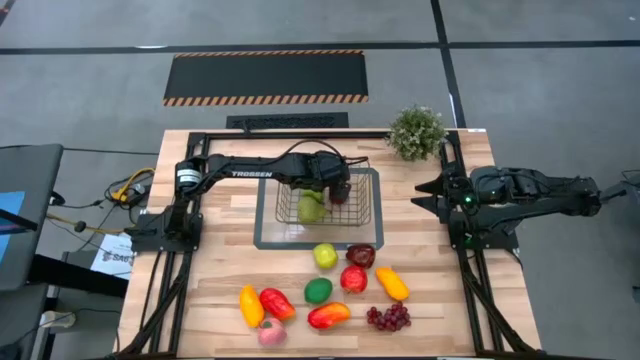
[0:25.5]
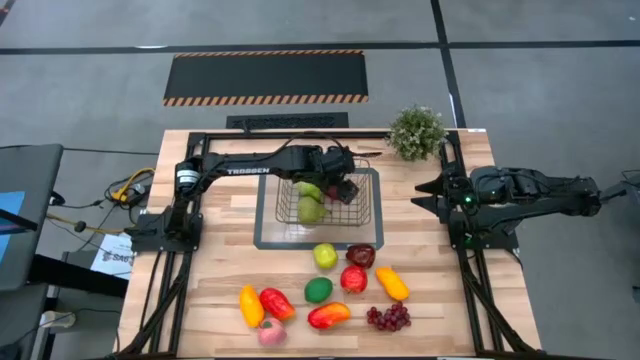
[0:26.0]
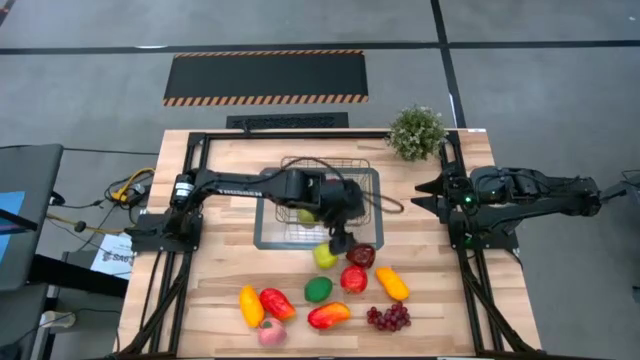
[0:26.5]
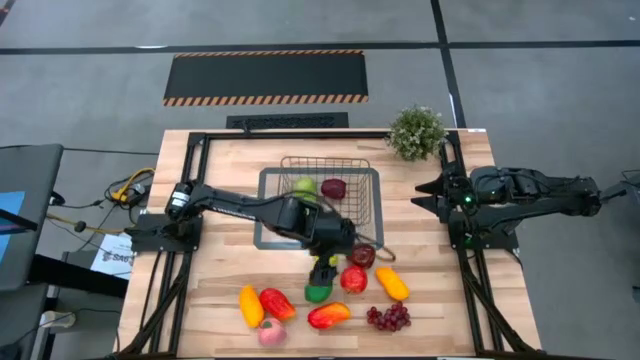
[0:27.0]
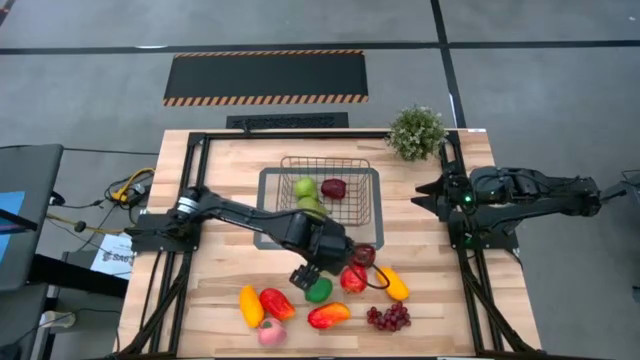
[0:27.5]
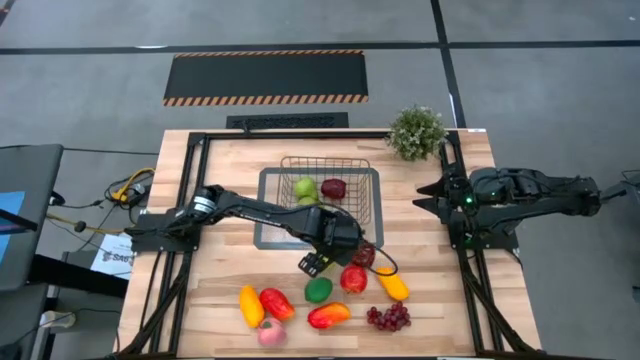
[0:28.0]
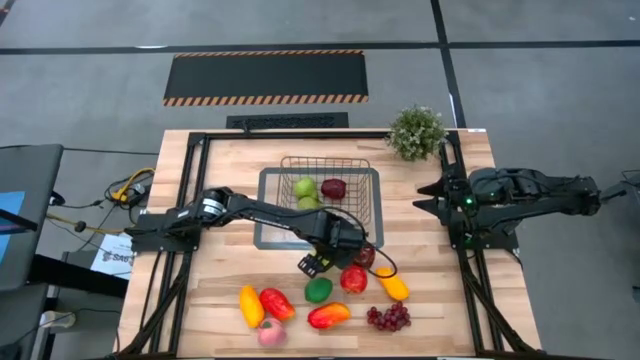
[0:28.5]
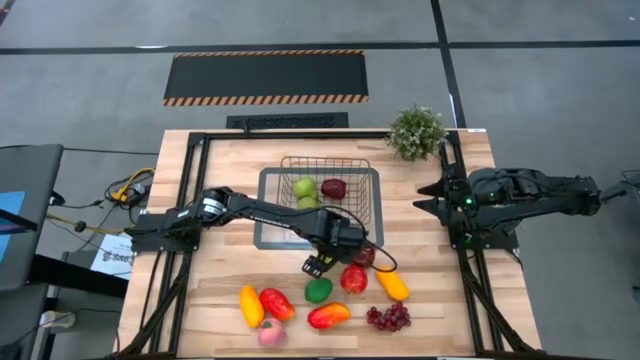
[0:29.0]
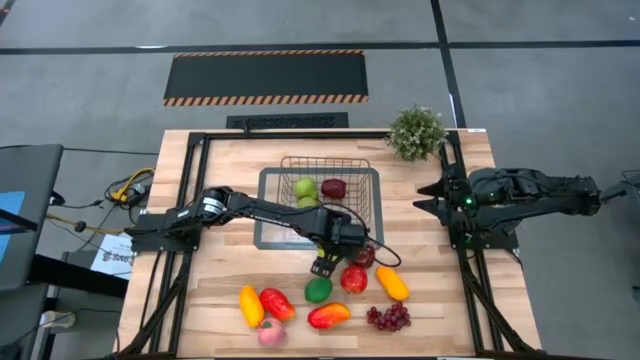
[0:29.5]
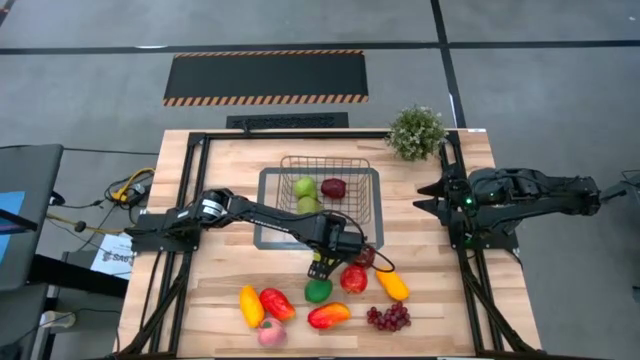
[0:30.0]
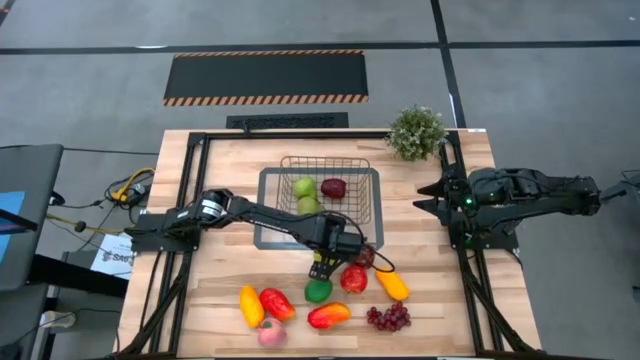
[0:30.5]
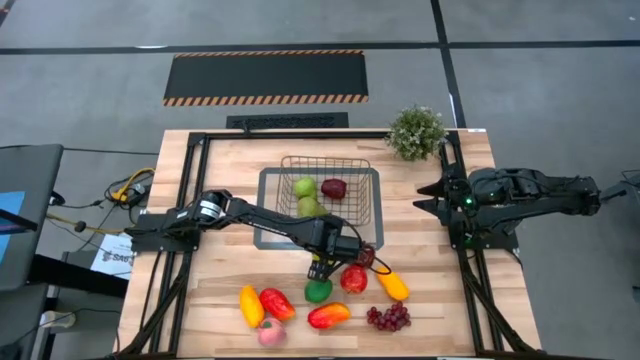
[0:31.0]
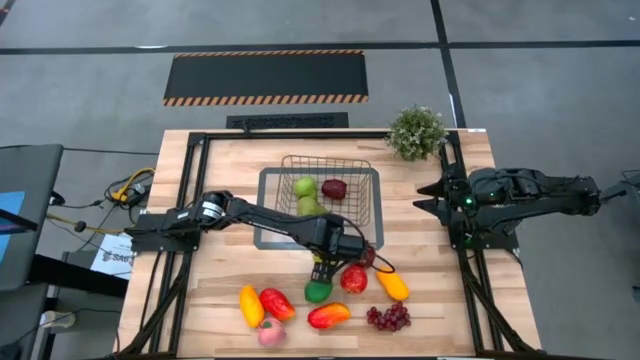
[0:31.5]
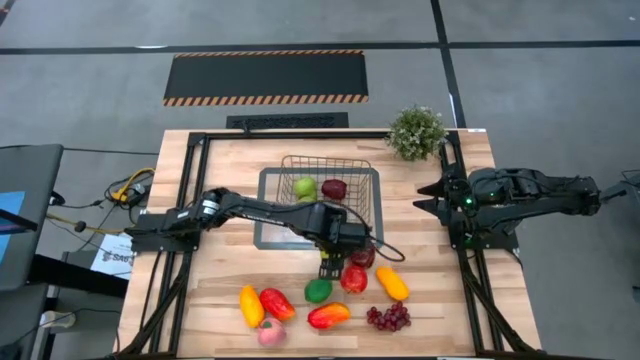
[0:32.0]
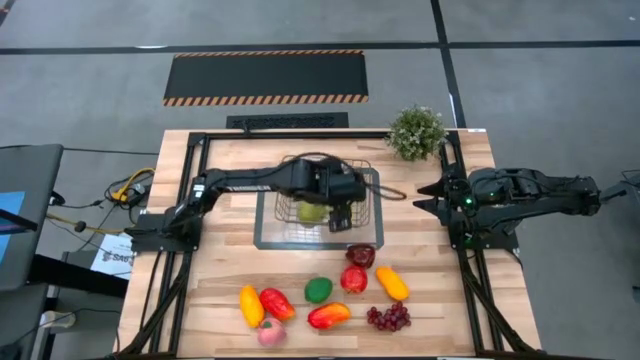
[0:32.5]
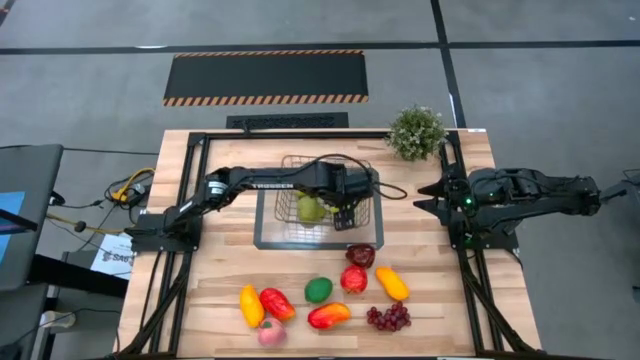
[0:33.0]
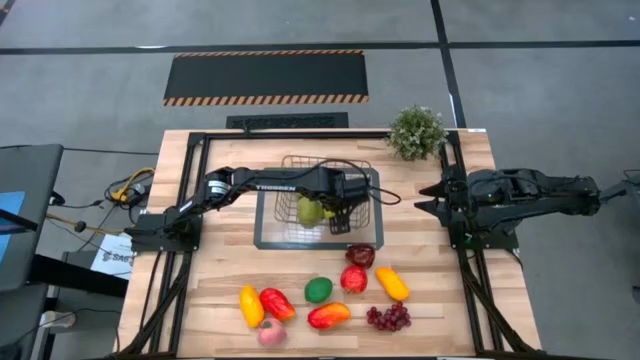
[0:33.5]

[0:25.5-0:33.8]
Task: Build produce basket
Put the green apple into the bin

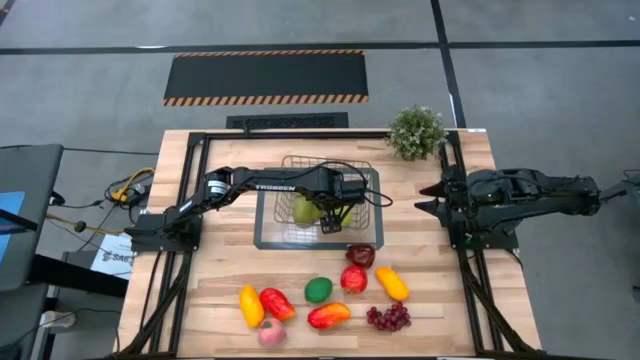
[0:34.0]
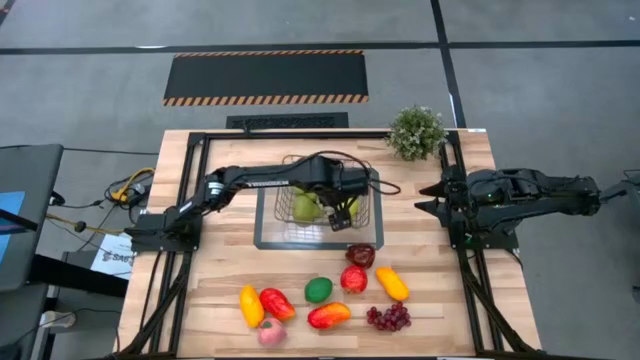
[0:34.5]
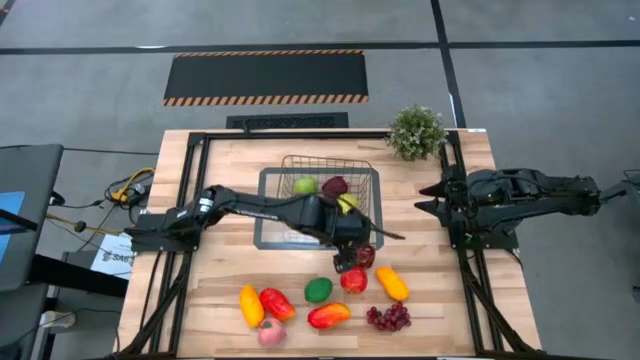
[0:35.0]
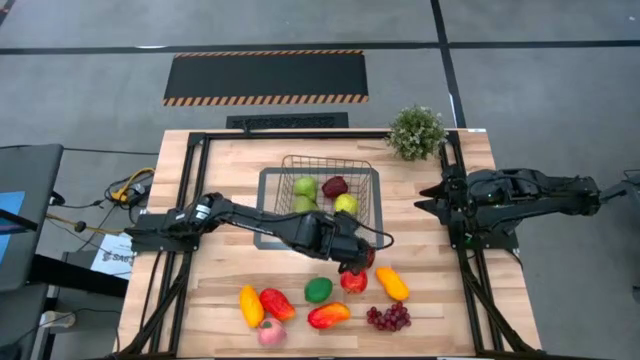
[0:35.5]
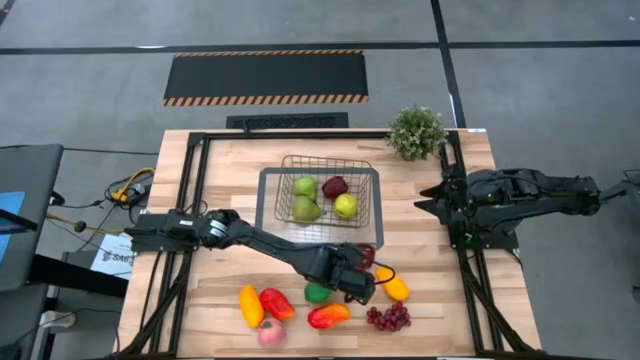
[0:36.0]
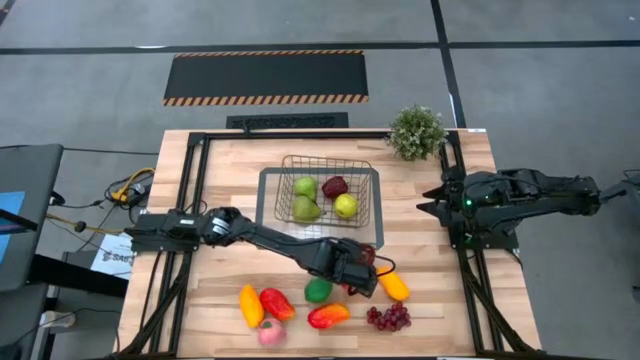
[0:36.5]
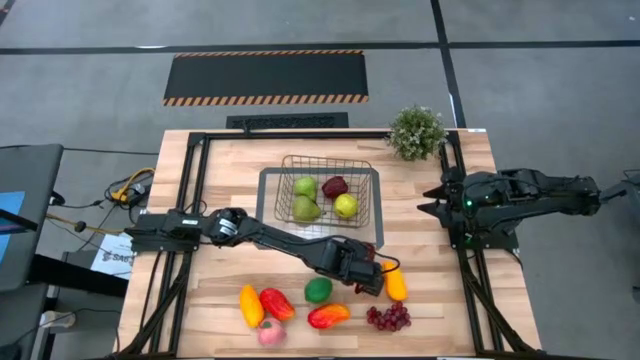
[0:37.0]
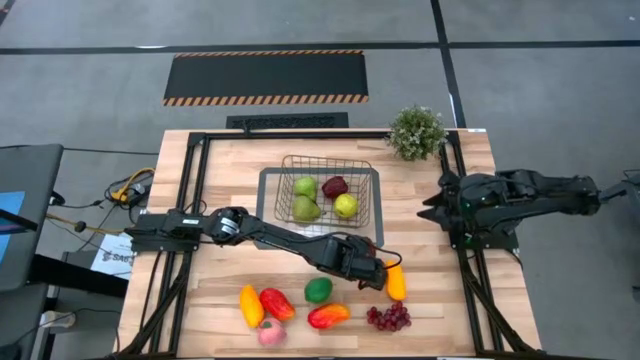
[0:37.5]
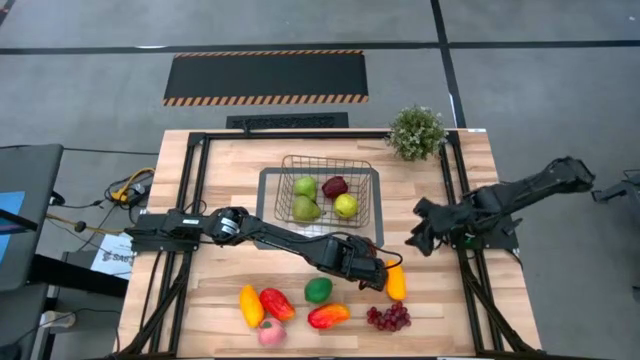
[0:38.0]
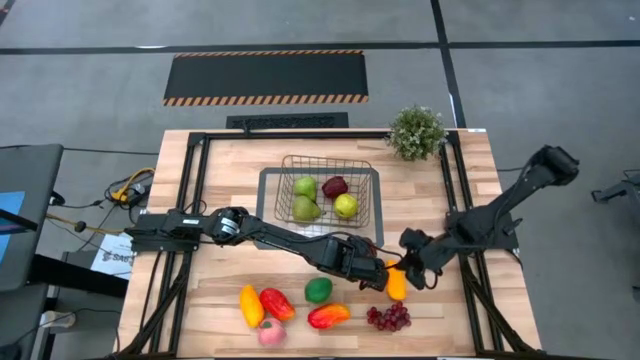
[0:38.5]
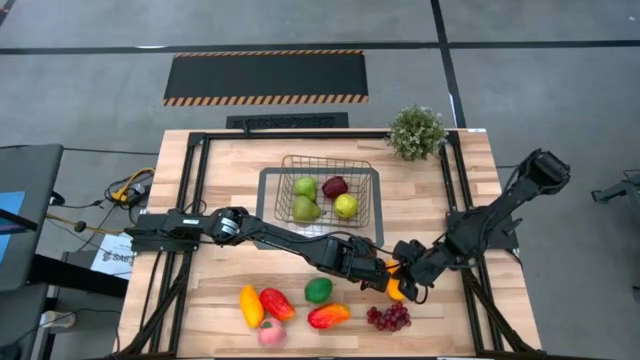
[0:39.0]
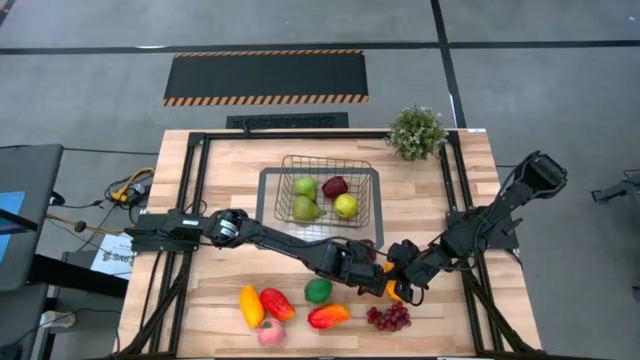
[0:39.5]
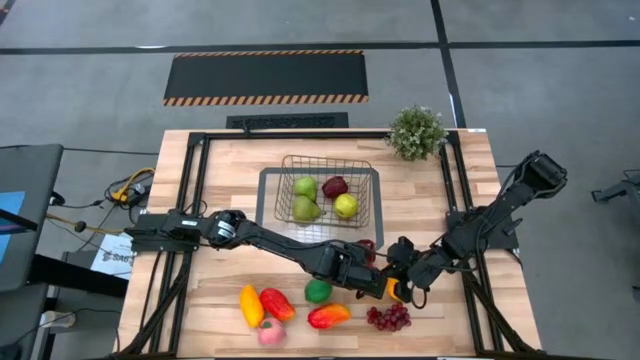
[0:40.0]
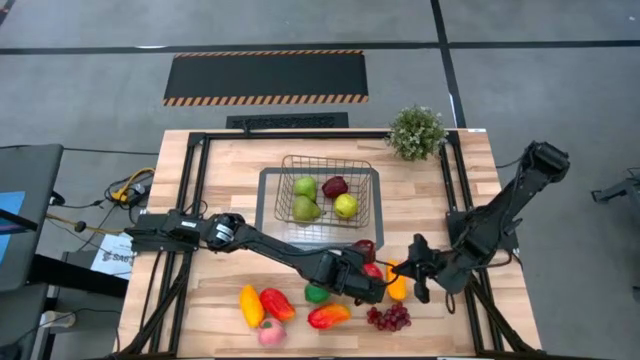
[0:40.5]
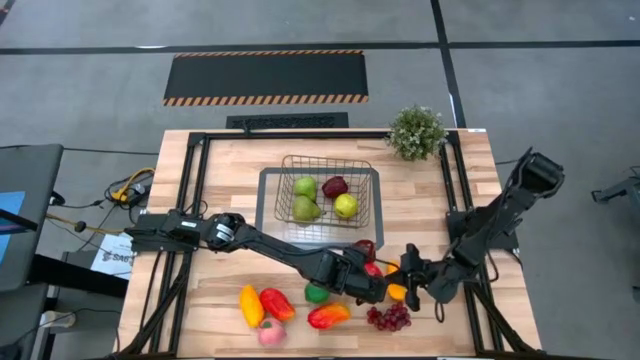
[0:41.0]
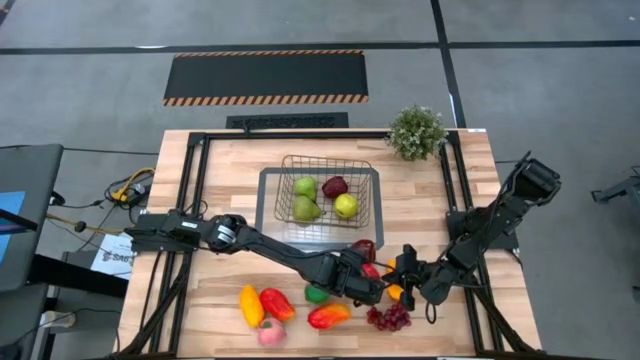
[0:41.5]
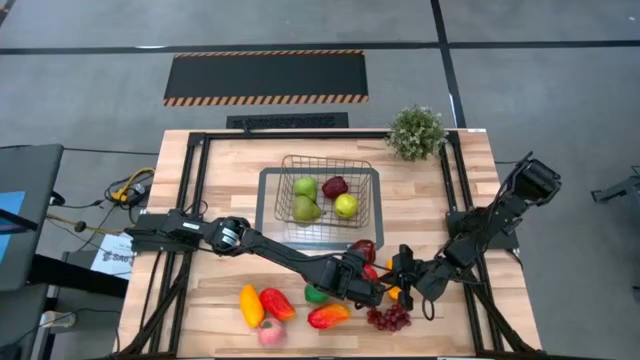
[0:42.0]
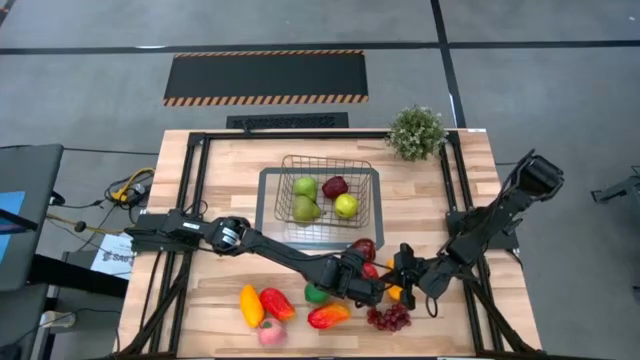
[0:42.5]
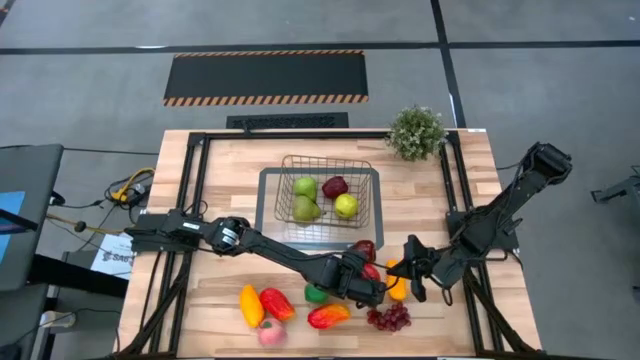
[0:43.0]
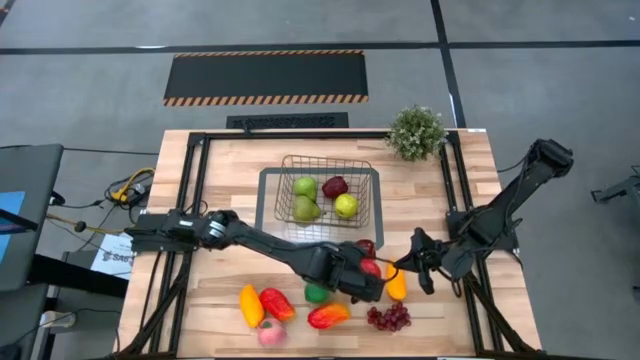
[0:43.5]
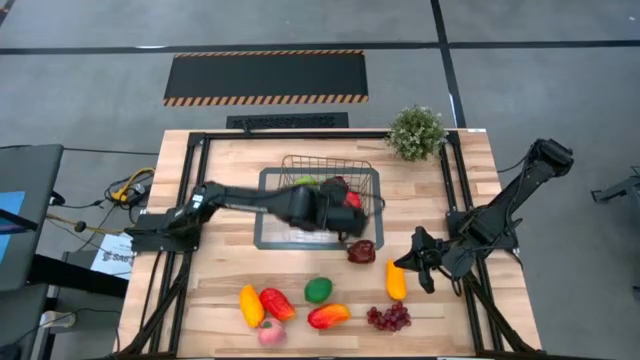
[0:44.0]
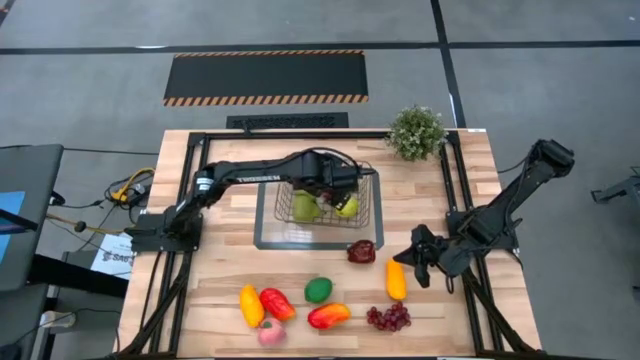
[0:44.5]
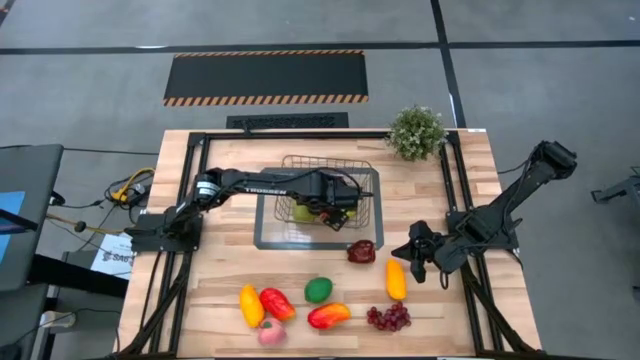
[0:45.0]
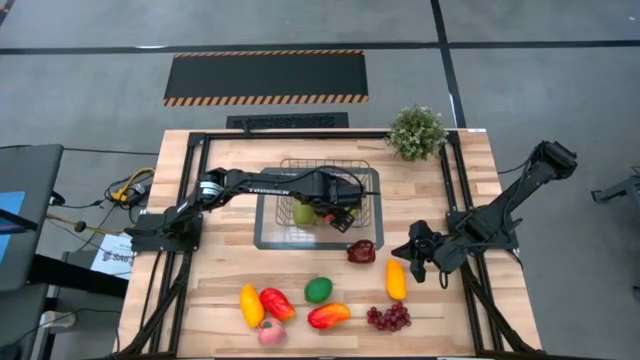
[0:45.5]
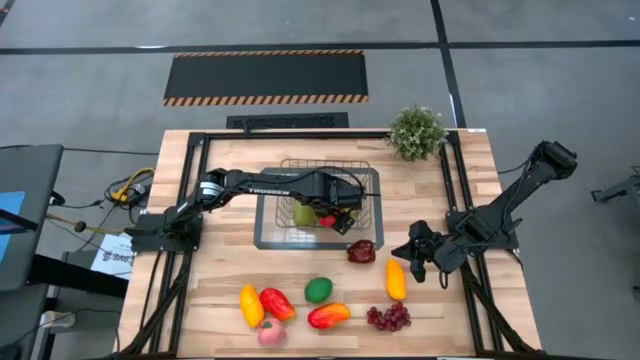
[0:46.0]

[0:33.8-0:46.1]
Put the red apple into the bin

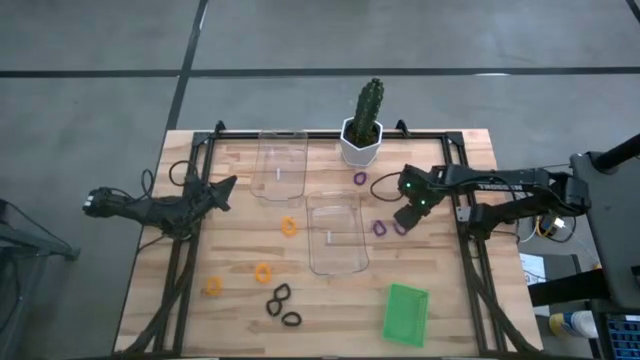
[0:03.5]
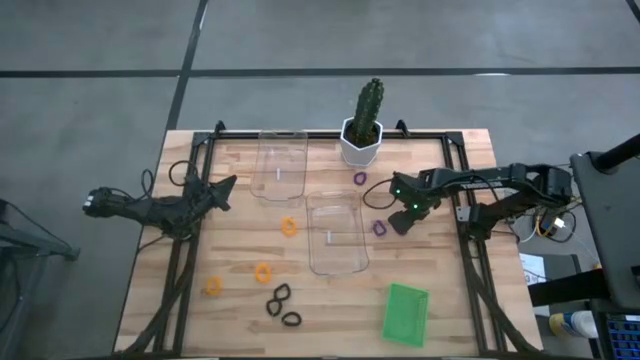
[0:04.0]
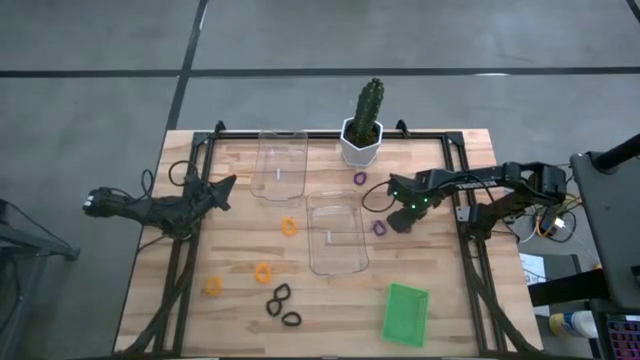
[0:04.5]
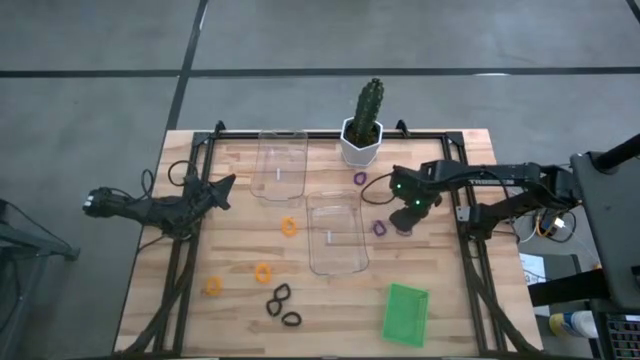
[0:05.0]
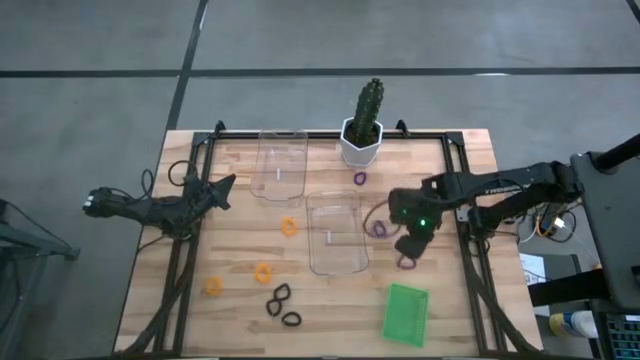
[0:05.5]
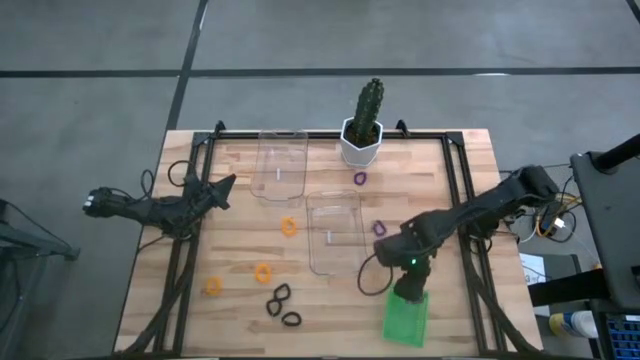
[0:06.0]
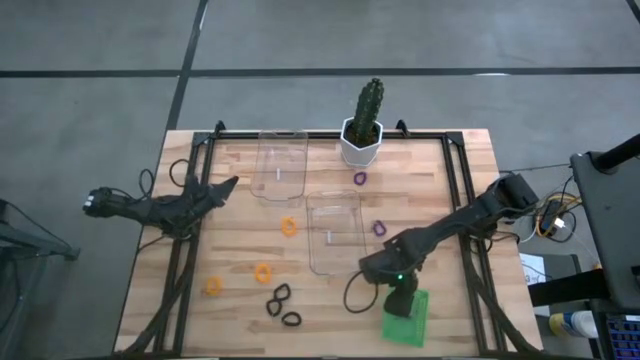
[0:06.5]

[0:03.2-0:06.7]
Task: Sort spring keychains
Put the right purple spring keychain into the green bin
